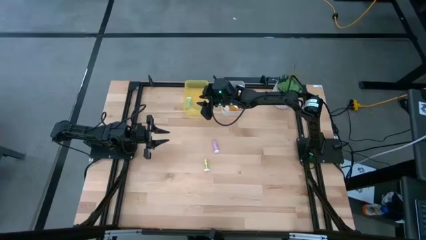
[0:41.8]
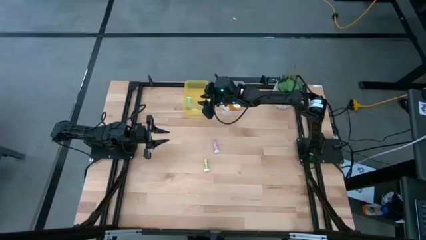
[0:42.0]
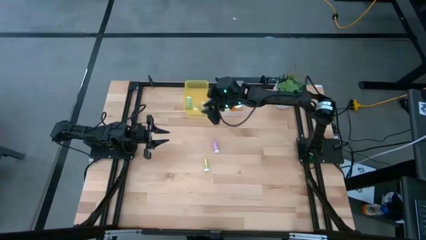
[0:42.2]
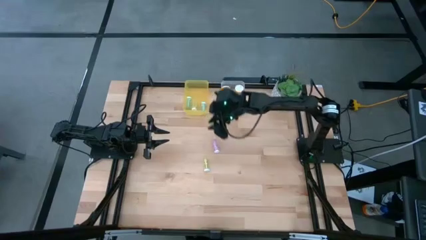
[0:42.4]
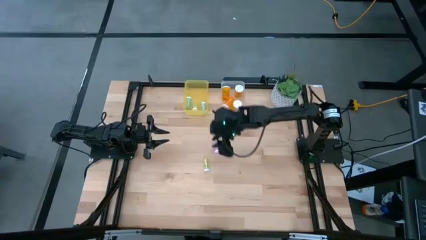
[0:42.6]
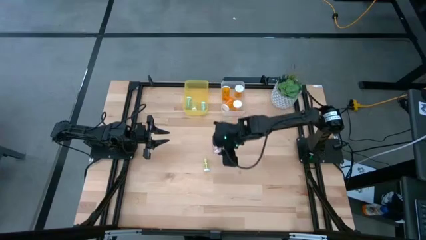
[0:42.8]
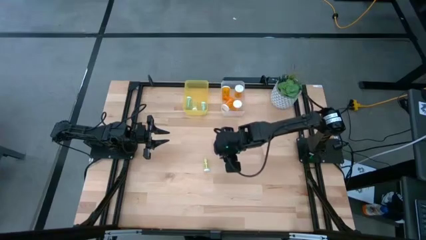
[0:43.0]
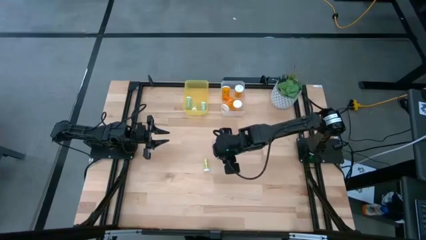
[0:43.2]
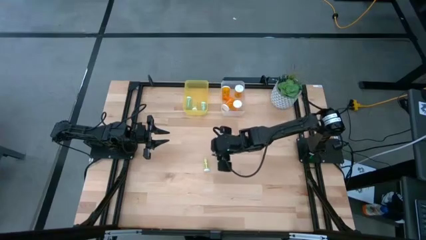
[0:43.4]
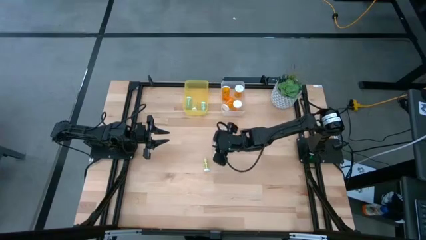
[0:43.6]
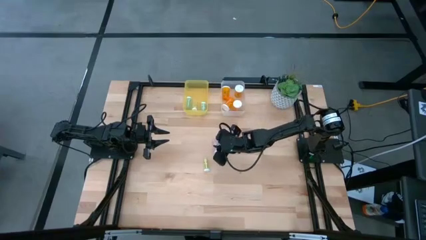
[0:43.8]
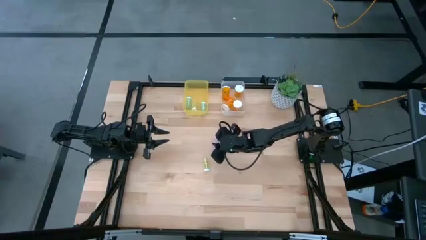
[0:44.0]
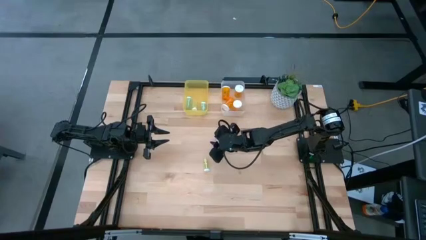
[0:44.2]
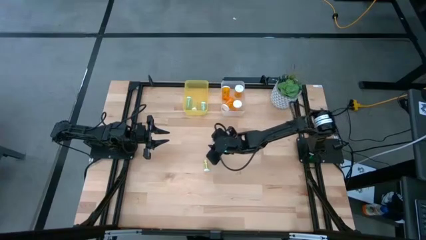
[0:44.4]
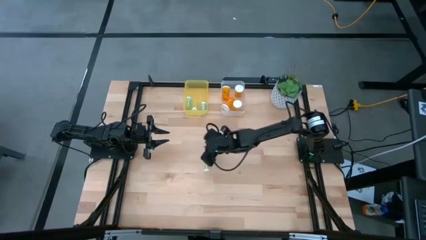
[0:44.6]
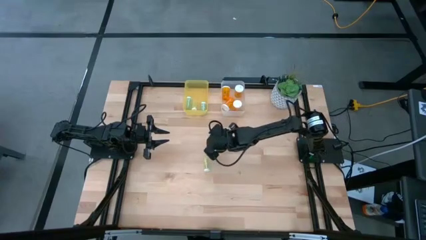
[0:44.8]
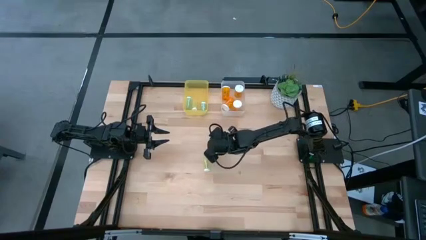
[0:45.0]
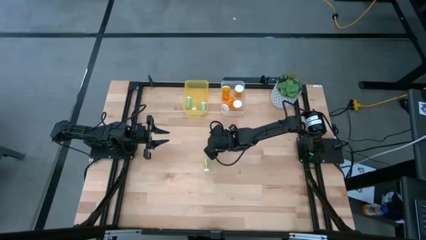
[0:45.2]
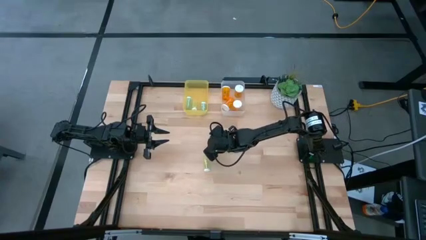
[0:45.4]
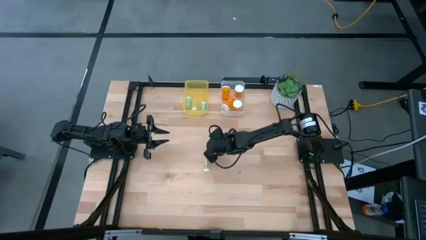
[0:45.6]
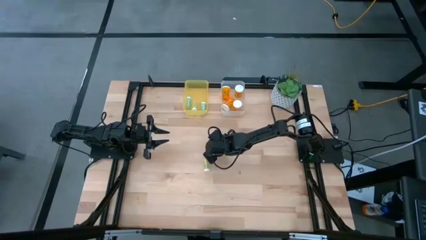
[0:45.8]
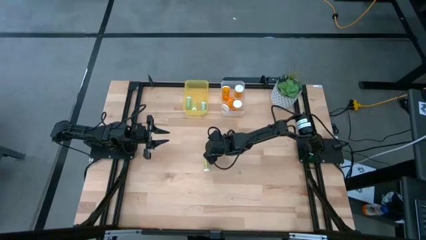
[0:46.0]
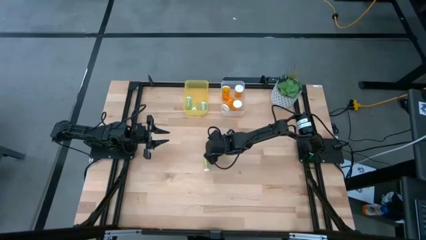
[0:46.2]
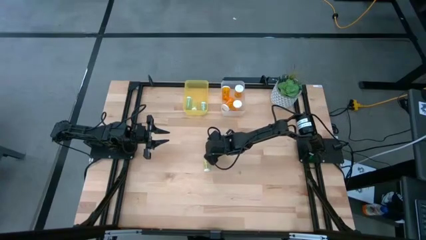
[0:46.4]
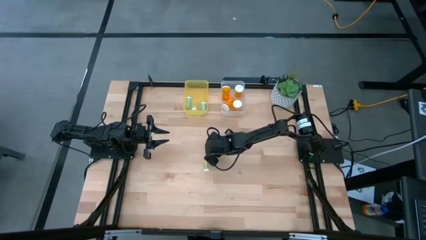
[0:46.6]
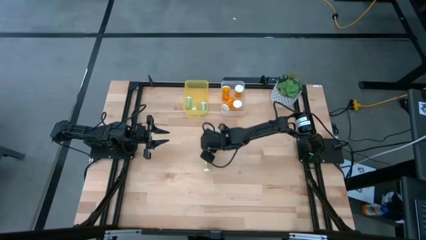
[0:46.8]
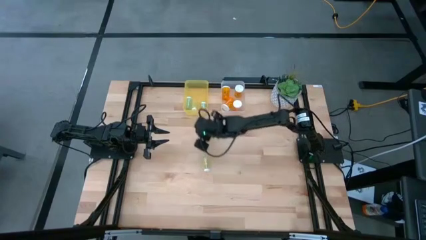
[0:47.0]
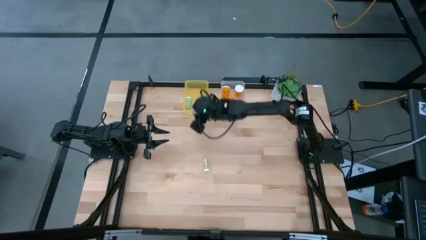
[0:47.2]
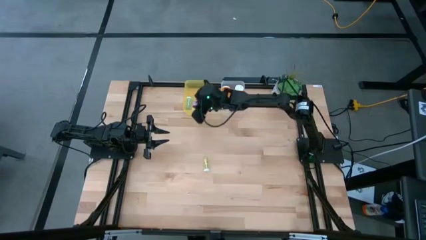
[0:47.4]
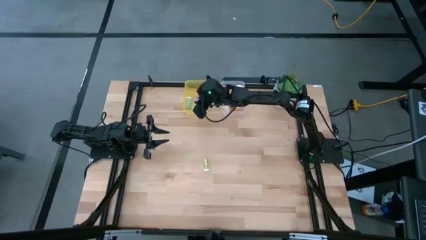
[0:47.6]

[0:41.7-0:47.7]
Task: Pick and place medicine bottles into bin by pill shape (circle, oval)
Put the pink tablet bottle into the yellow bin

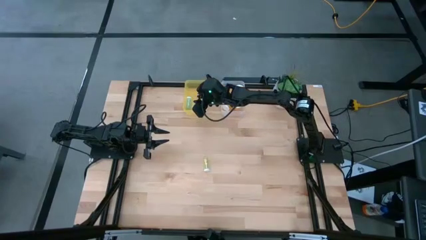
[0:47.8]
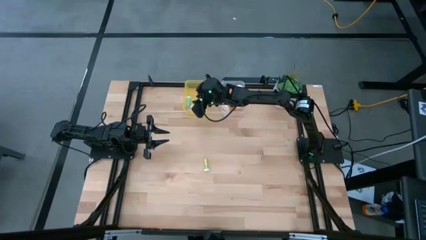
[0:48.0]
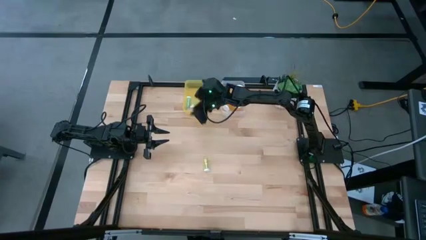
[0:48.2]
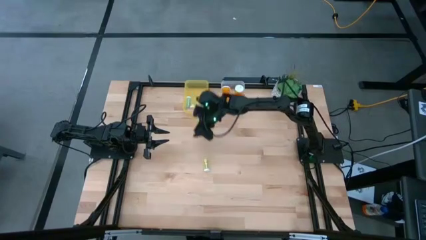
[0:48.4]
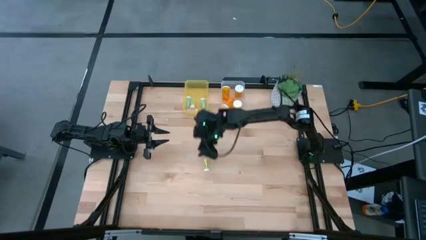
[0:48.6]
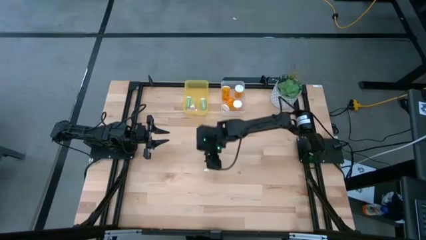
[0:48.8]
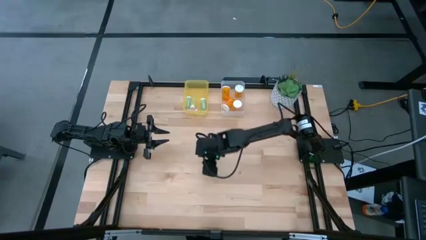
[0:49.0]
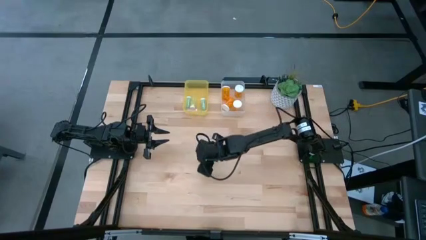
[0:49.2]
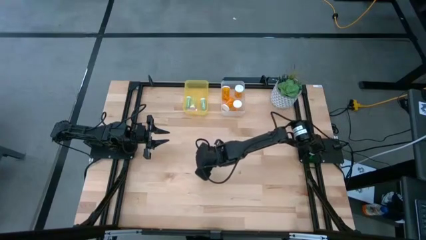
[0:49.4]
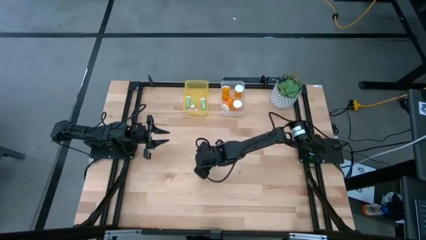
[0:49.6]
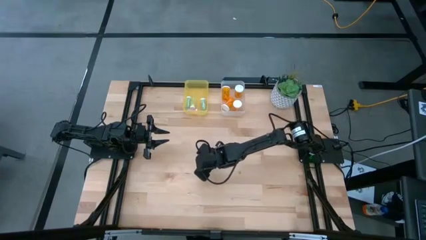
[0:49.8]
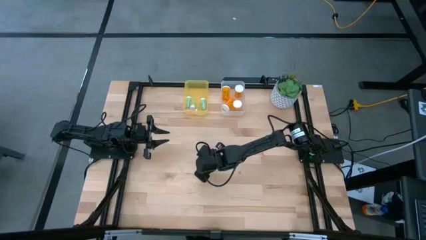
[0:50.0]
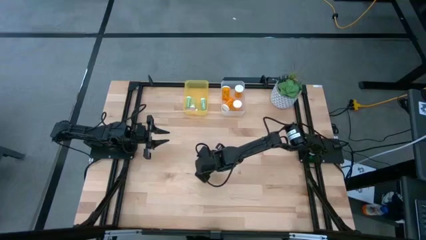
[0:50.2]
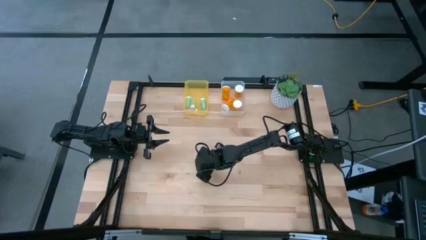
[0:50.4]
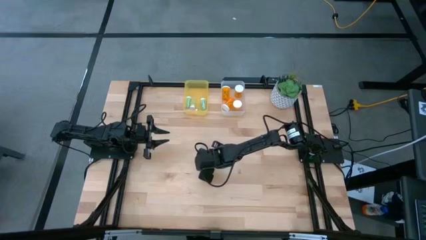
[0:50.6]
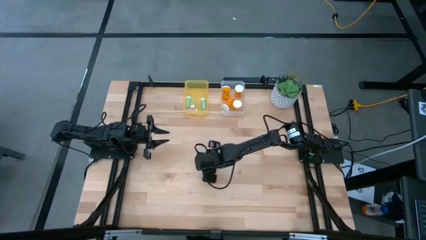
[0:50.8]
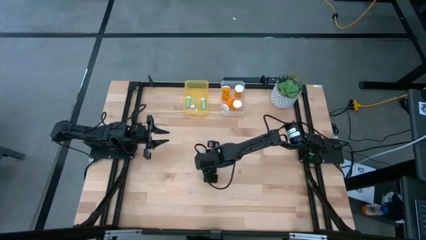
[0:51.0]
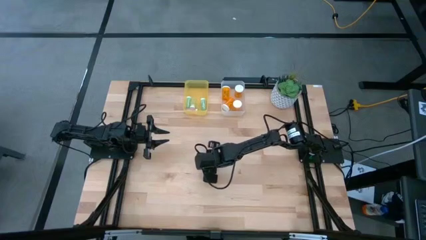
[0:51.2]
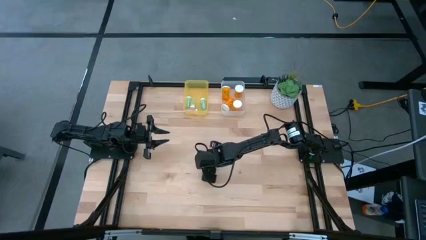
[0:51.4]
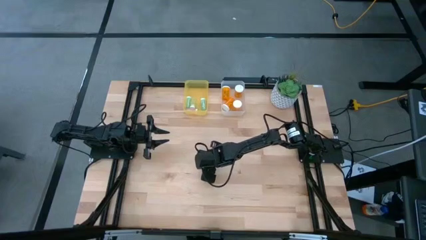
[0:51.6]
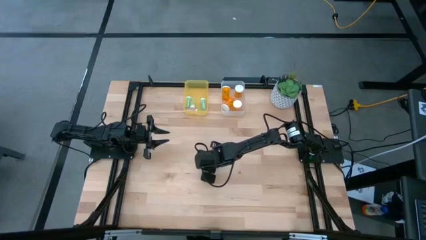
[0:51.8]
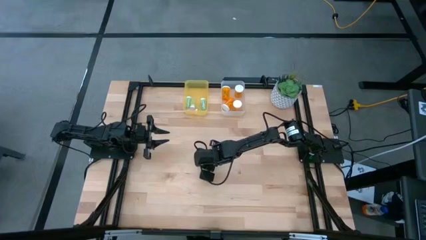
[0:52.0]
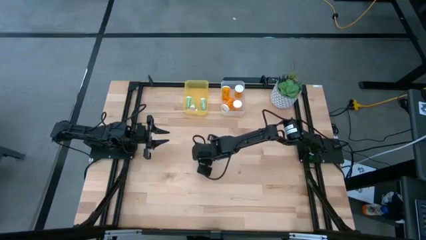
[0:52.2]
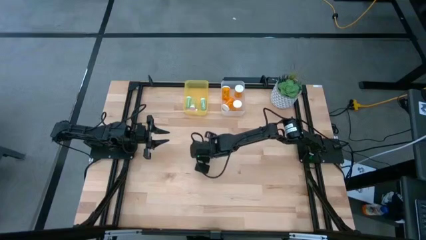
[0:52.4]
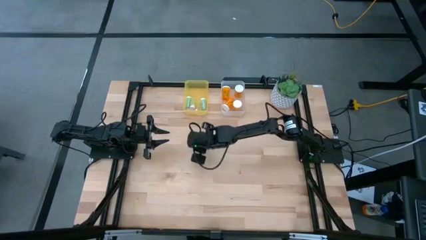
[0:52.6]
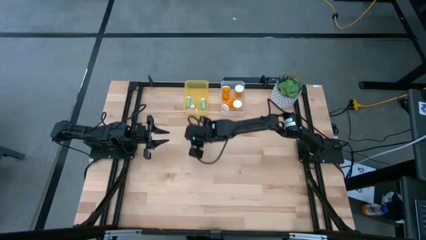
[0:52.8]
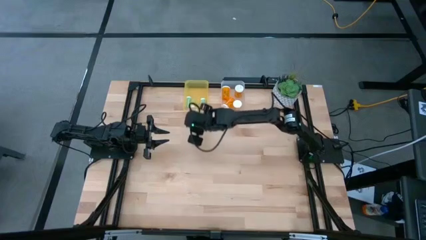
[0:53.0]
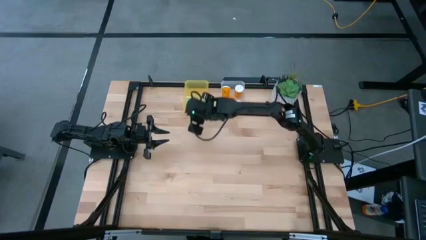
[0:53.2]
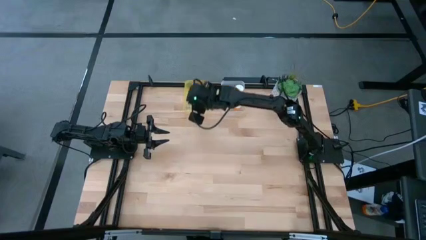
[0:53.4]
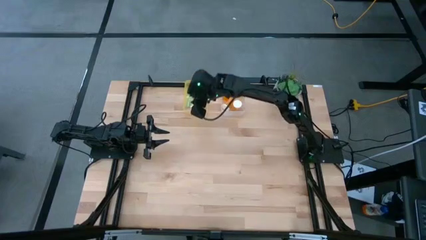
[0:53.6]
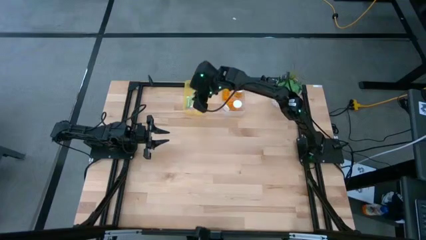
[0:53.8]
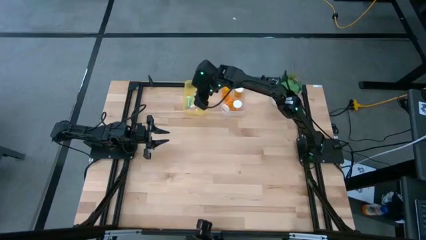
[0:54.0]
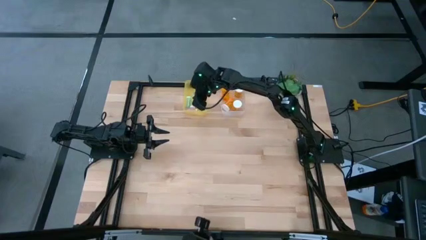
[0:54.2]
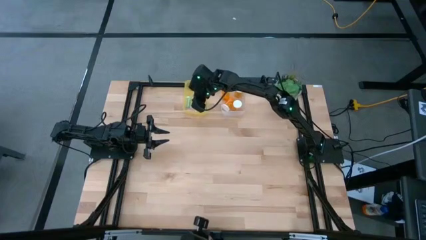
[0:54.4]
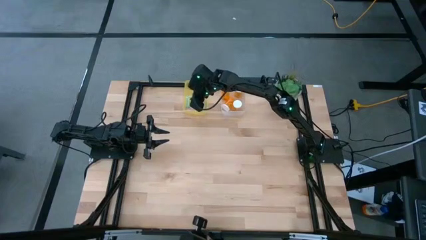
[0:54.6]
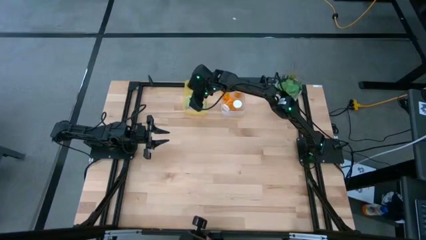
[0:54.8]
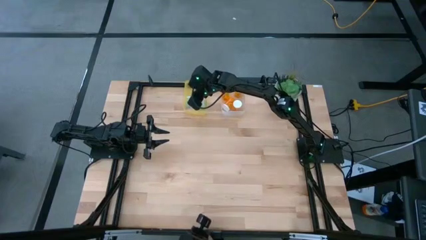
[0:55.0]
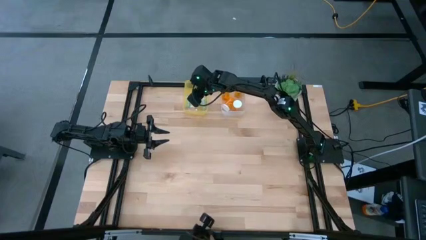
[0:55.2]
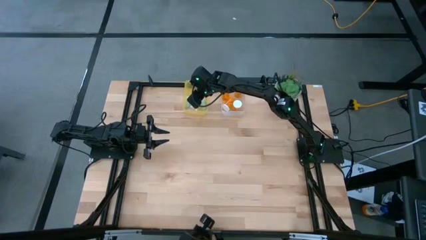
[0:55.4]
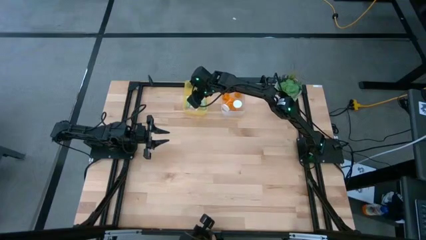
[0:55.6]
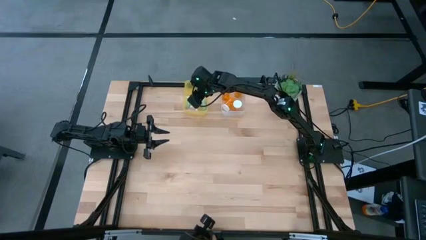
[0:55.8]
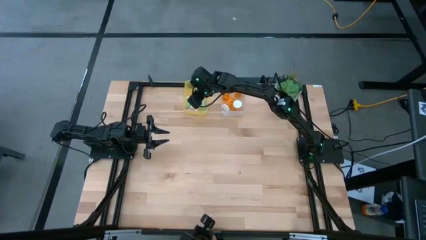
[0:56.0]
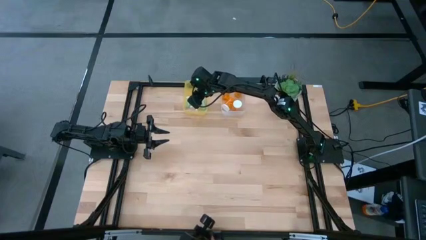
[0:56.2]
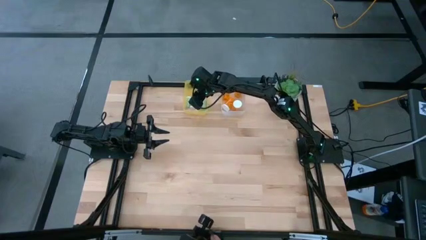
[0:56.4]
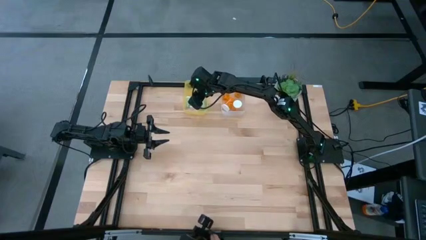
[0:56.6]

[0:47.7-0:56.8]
Put the yellow tablet bottle into the yellow bin

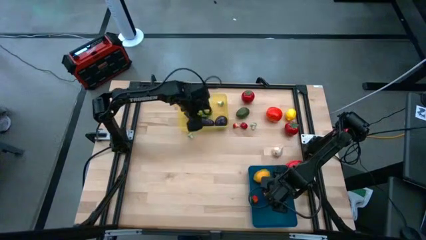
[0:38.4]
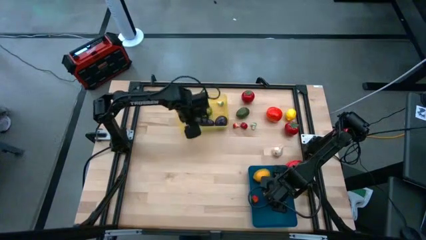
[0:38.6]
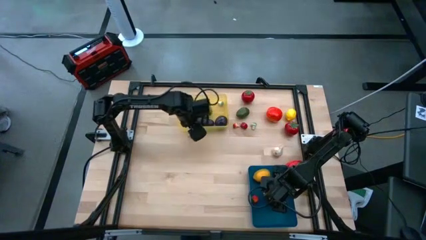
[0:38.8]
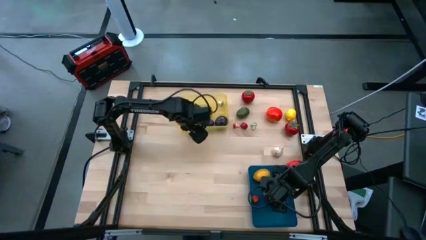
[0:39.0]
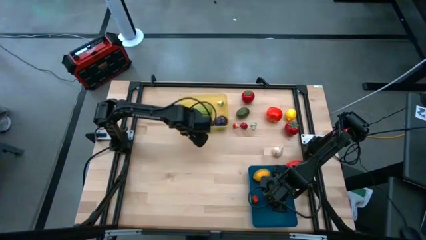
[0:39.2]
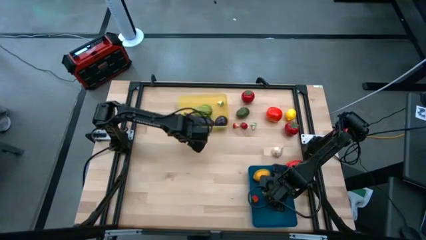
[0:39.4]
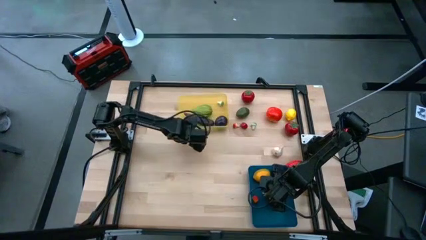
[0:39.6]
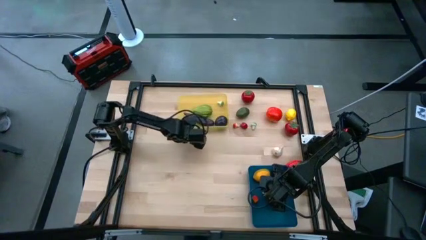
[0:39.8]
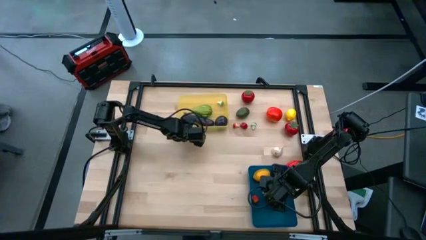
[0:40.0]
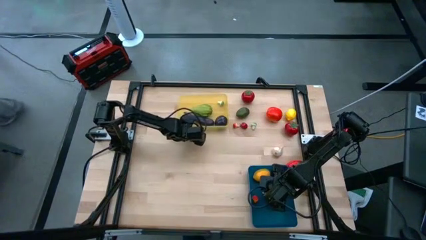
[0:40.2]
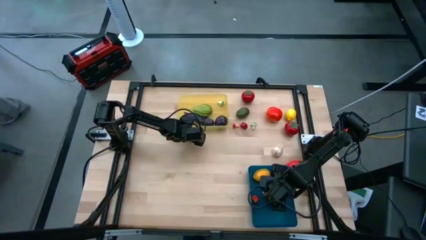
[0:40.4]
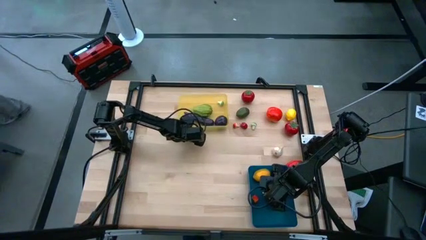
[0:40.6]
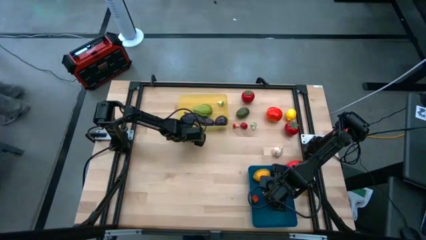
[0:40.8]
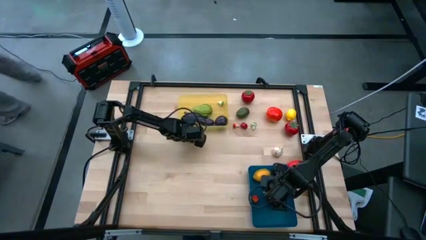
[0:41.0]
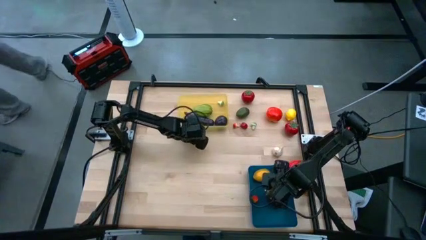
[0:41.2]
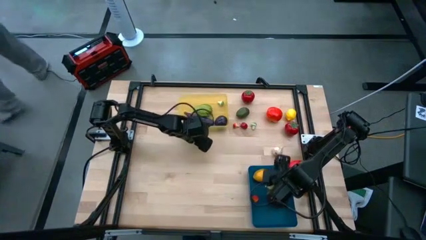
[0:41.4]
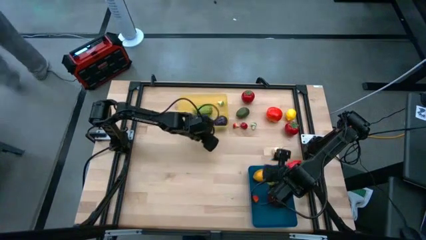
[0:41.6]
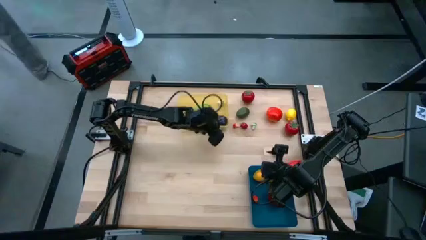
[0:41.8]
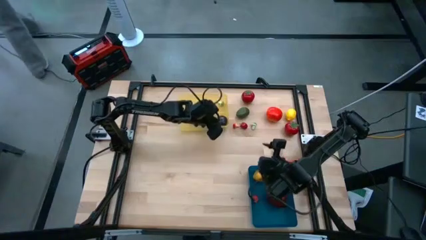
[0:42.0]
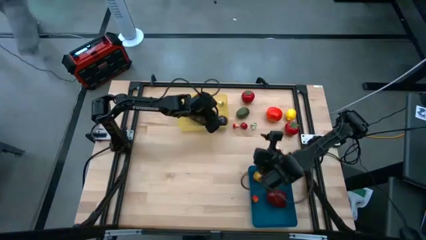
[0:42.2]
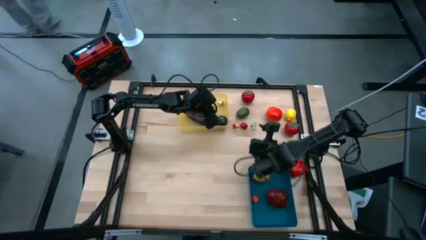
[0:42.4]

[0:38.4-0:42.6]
Task: Sort produce into baskets
Put the green mushroom into the yellow bin
